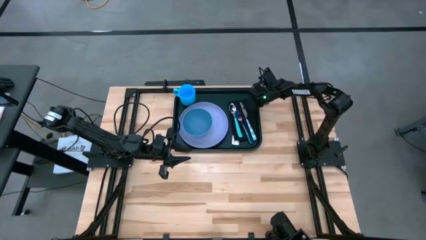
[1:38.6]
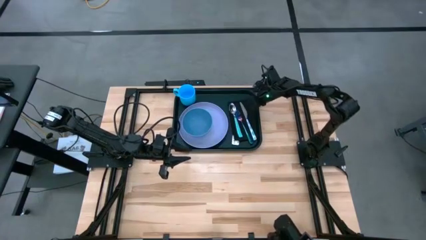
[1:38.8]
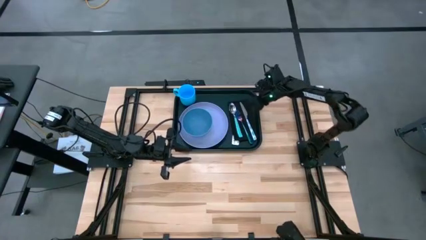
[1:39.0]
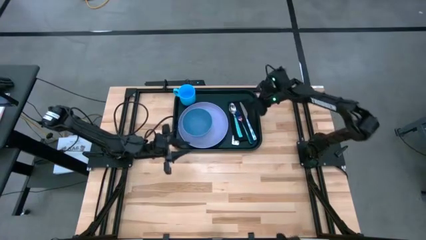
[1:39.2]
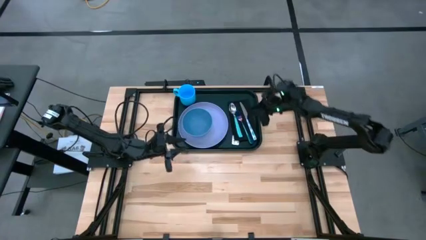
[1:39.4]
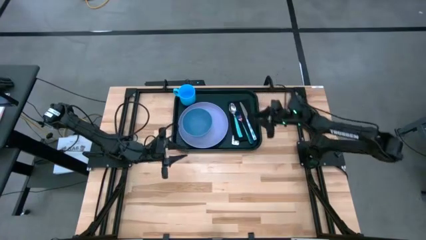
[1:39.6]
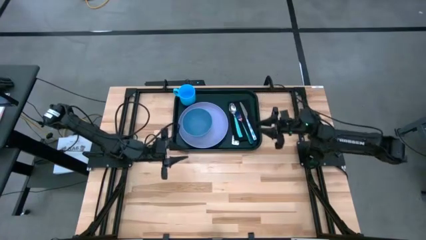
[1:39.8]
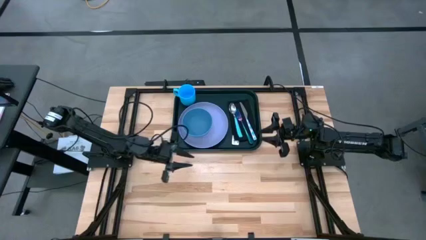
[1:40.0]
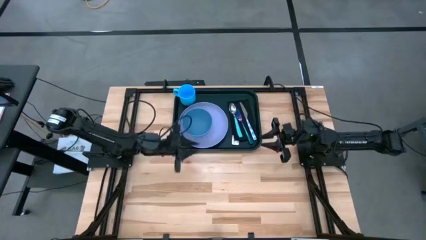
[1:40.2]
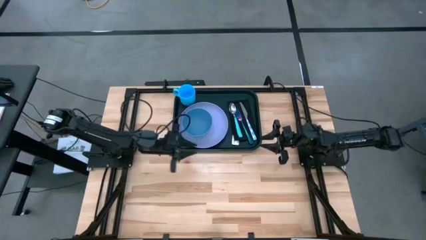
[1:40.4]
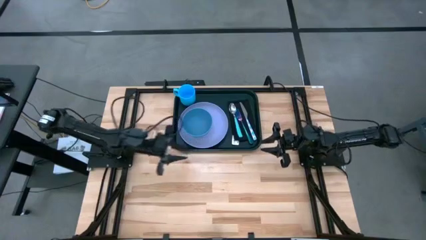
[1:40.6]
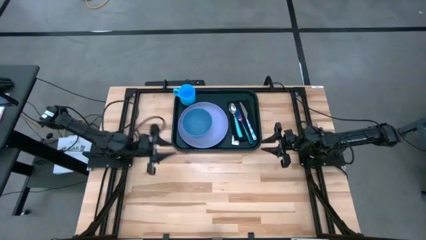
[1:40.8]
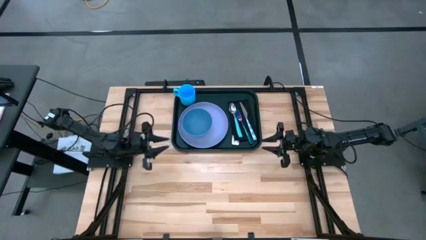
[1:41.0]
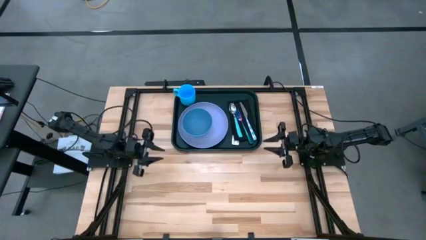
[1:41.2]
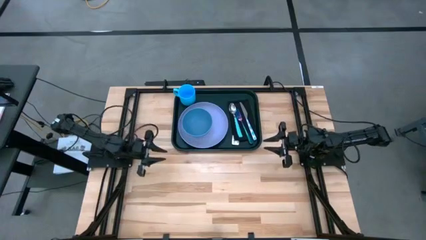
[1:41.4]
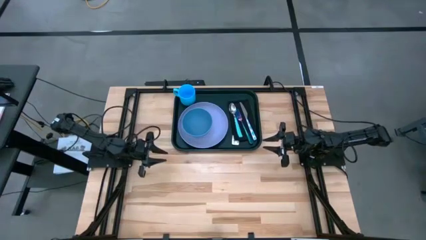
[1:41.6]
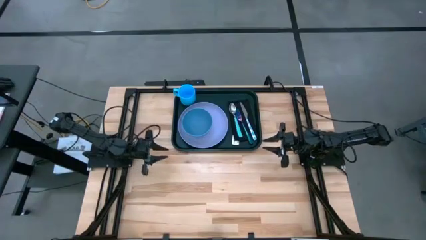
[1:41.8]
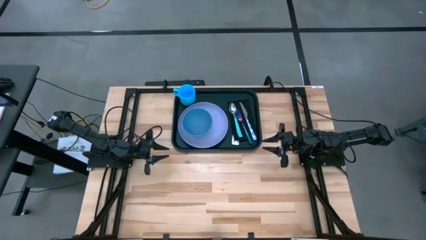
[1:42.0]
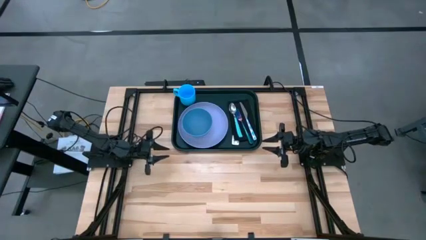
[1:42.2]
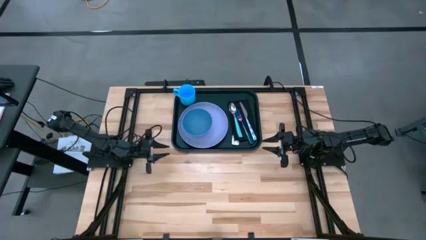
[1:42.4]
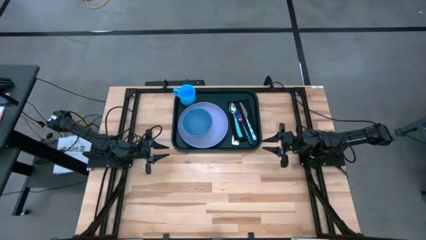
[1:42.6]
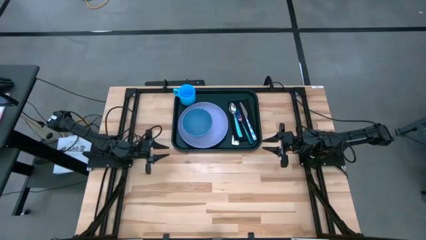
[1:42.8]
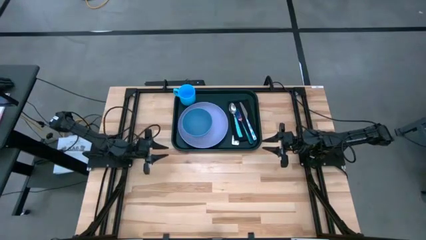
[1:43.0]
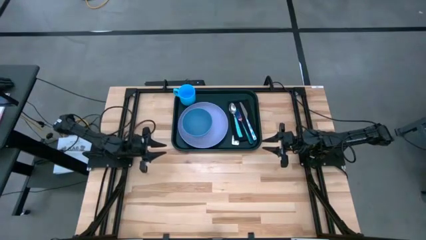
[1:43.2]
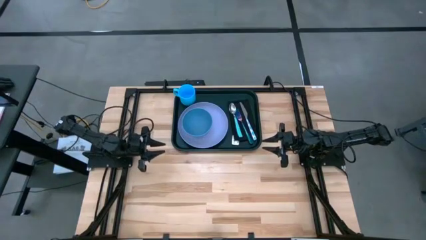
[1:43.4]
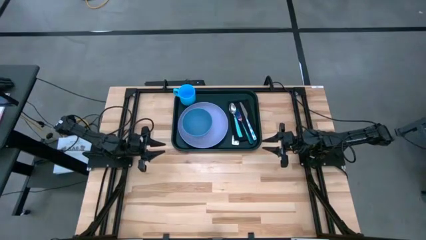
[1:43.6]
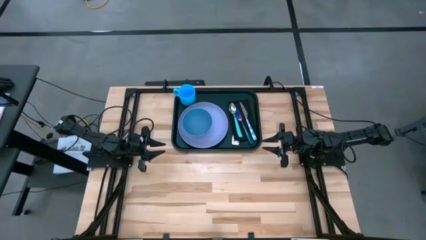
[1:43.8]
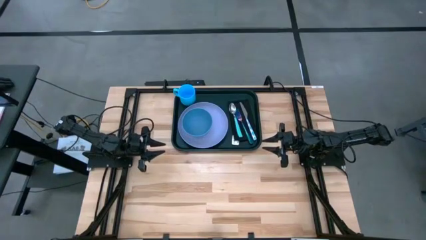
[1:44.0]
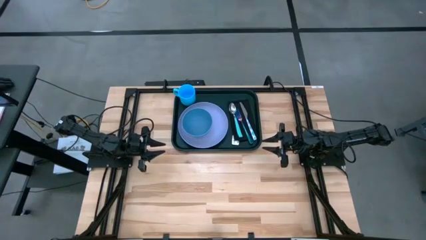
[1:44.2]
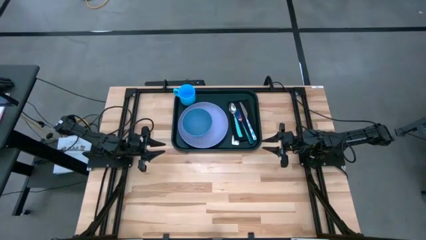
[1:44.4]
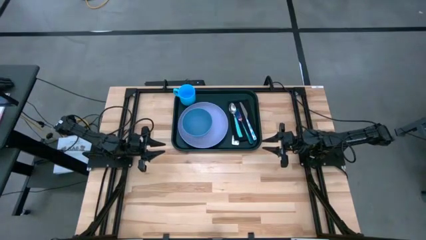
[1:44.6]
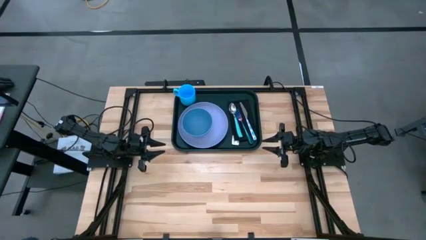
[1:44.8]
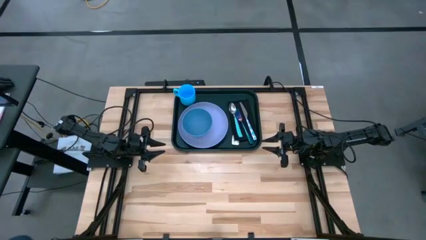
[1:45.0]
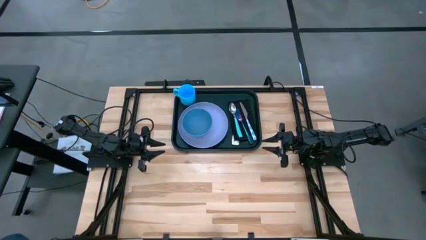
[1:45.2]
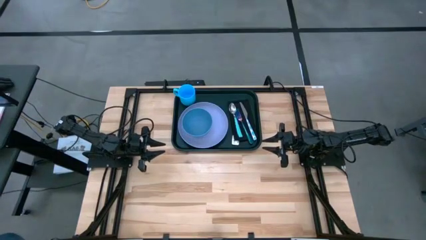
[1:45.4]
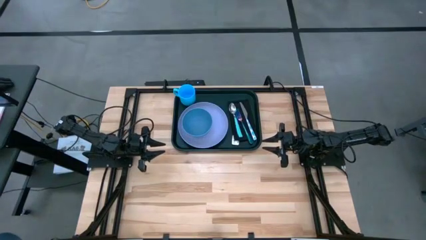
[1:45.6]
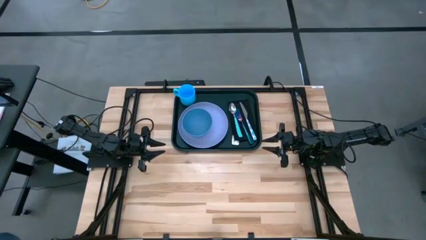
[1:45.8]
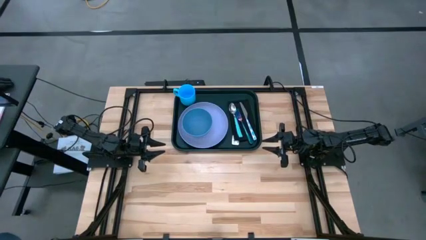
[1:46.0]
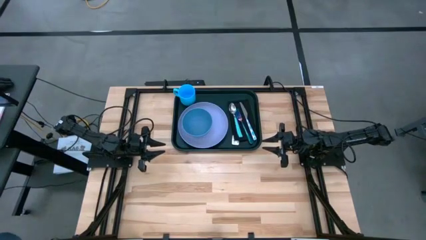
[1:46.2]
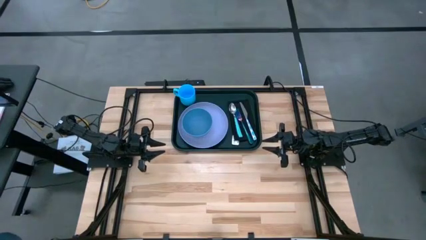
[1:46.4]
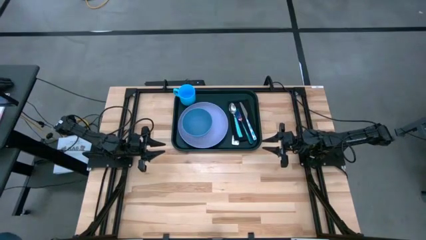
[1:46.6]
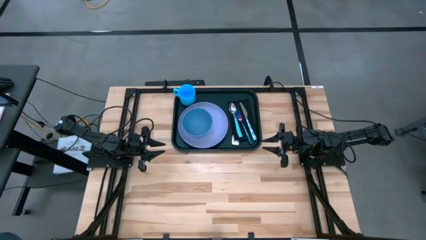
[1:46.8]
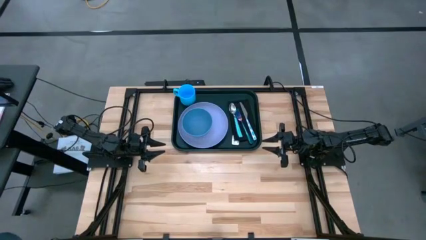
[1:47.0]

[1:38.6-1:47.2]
Task: Set up tray
Return to Home Position
